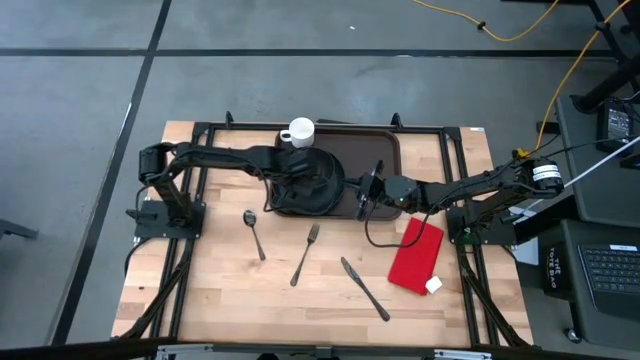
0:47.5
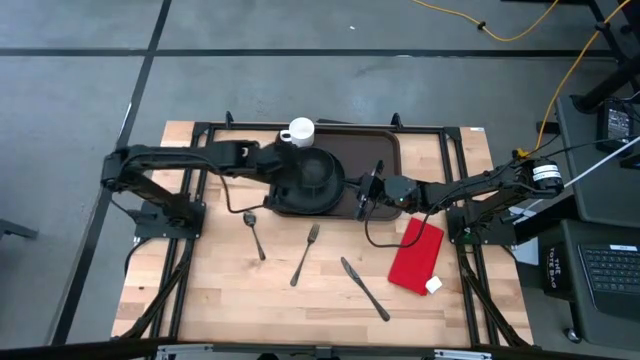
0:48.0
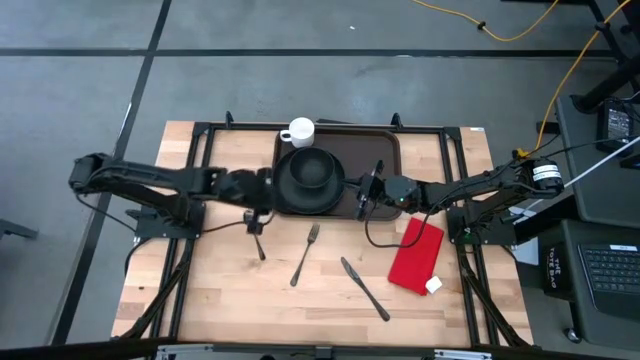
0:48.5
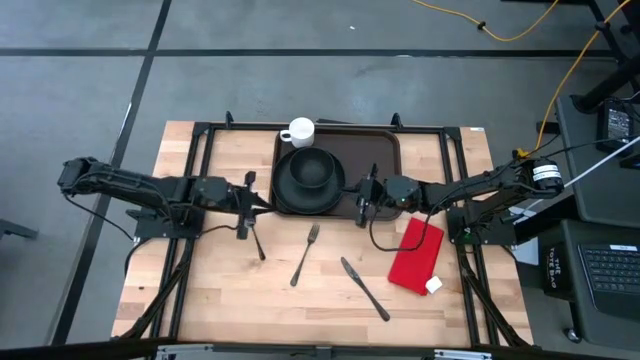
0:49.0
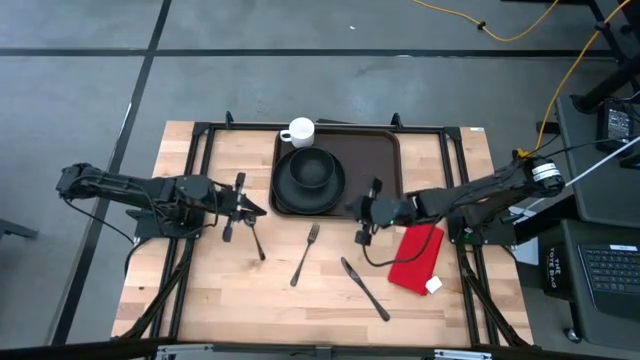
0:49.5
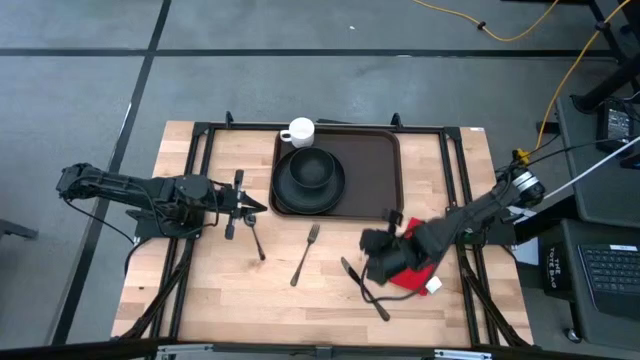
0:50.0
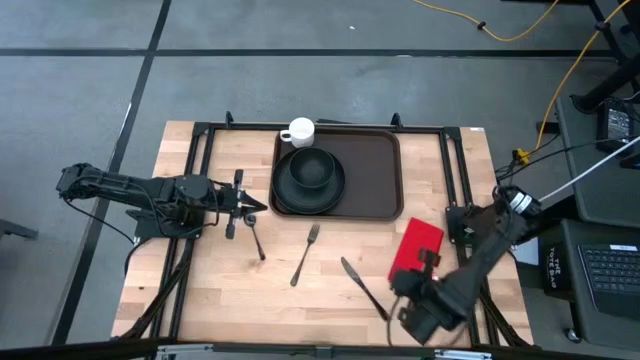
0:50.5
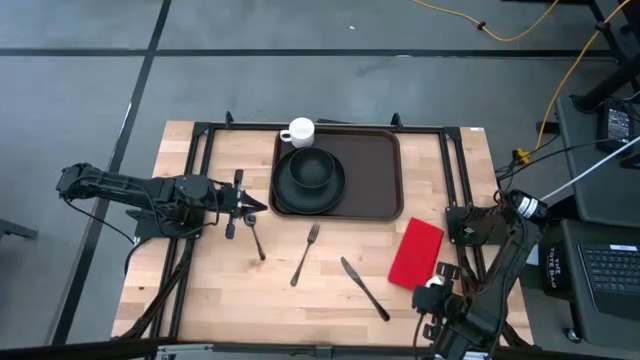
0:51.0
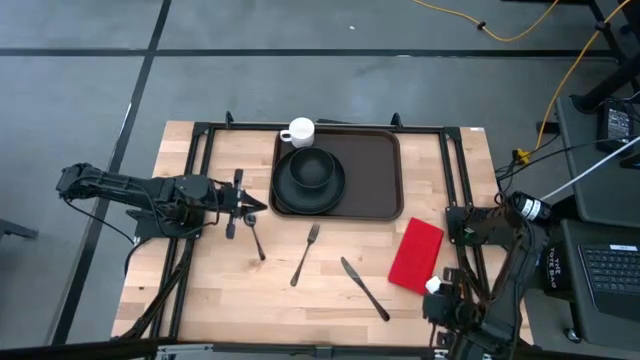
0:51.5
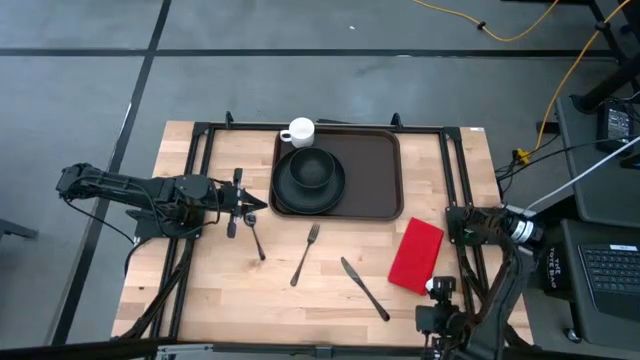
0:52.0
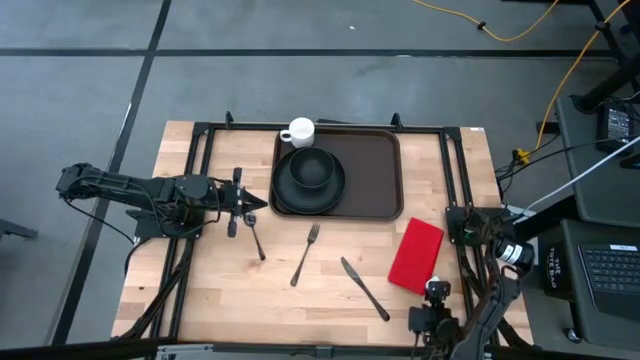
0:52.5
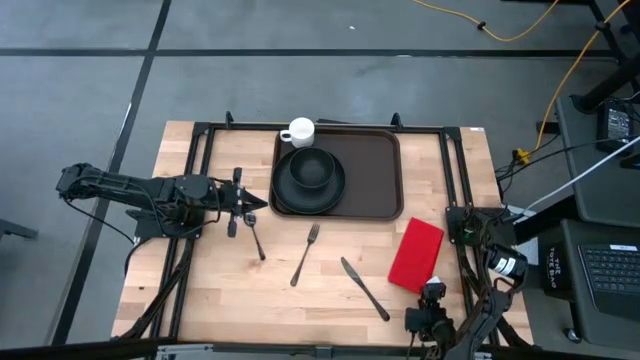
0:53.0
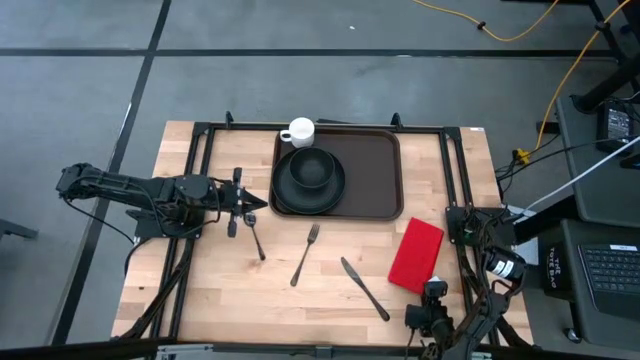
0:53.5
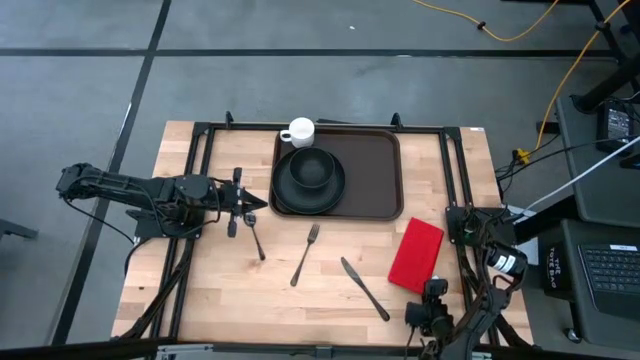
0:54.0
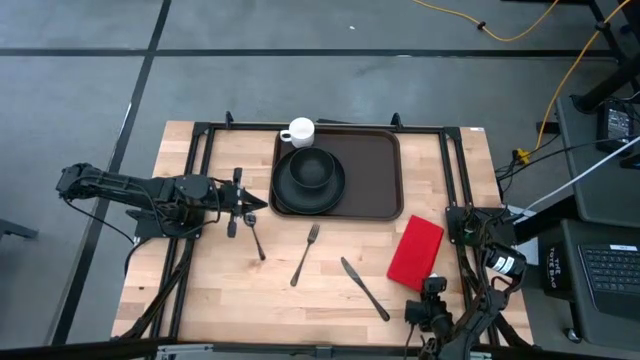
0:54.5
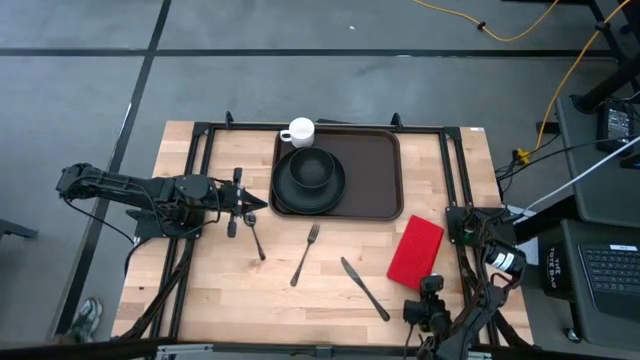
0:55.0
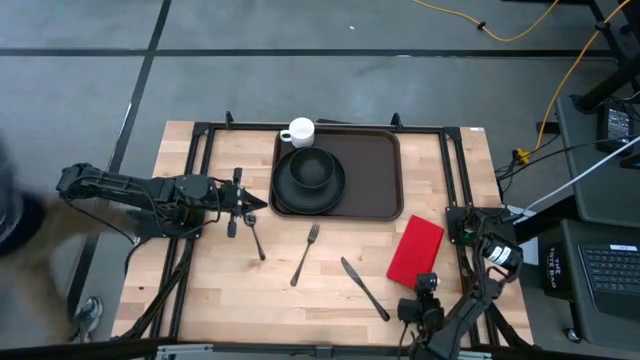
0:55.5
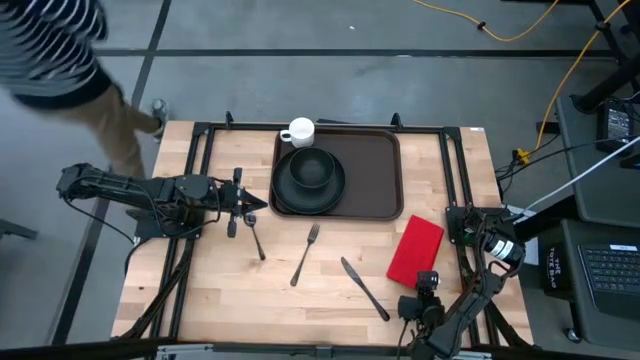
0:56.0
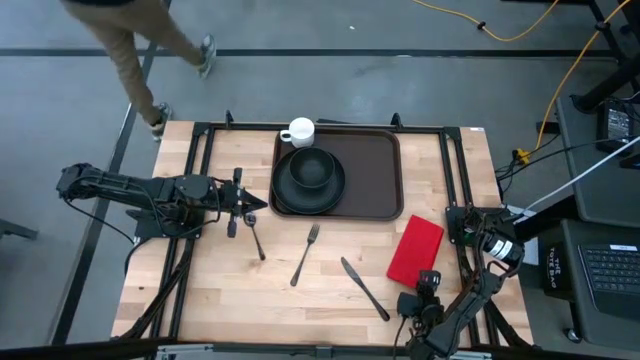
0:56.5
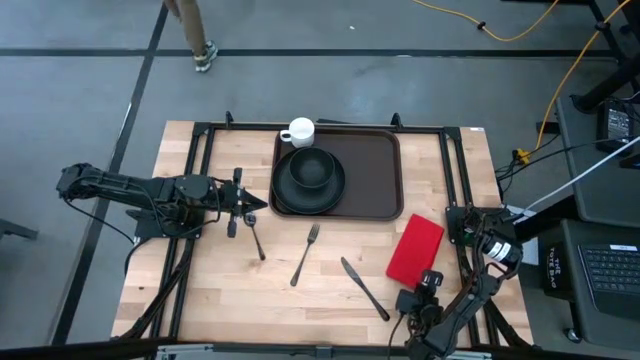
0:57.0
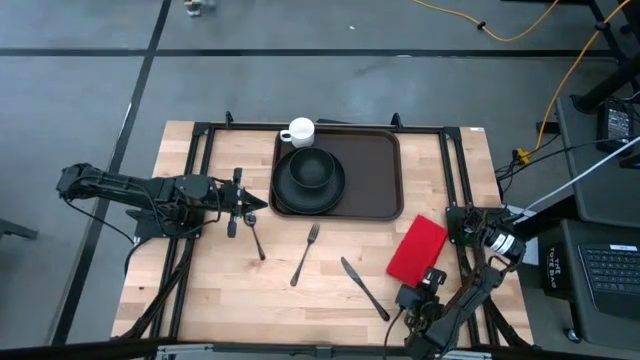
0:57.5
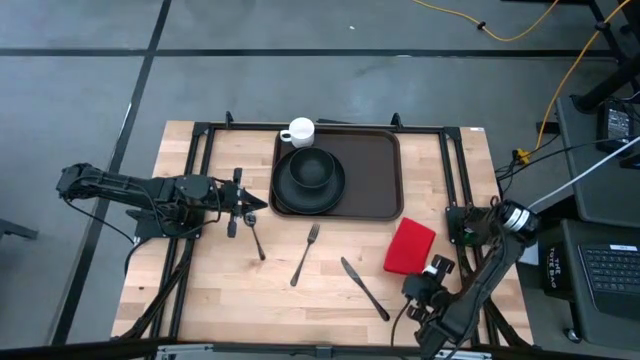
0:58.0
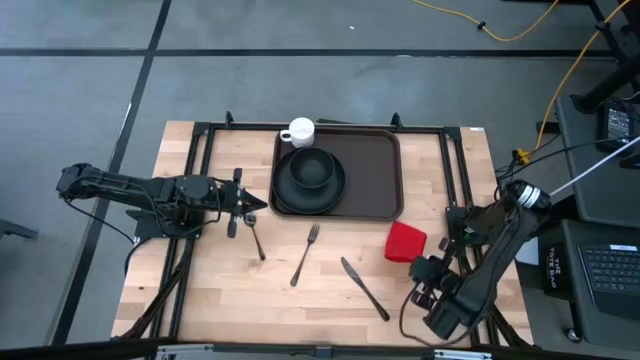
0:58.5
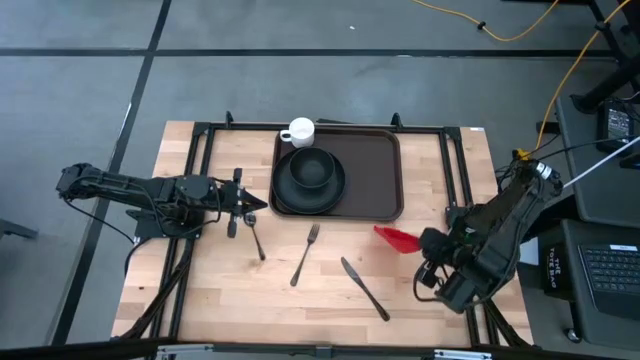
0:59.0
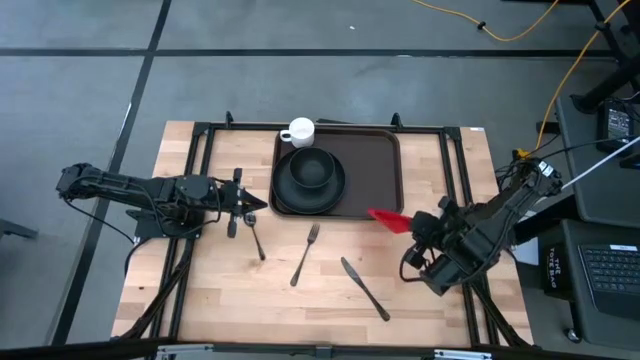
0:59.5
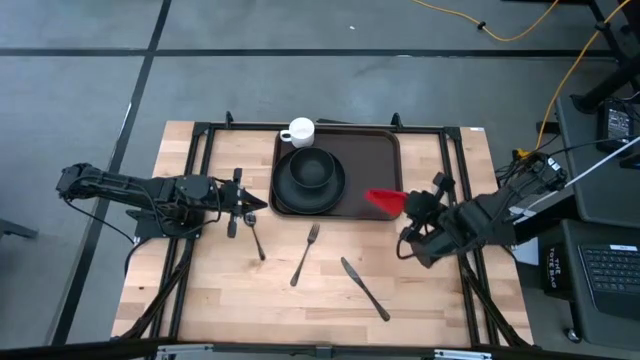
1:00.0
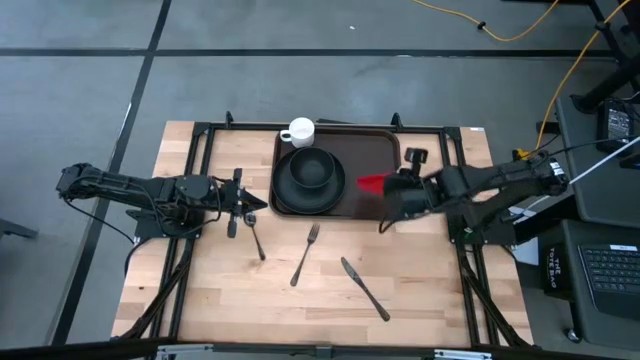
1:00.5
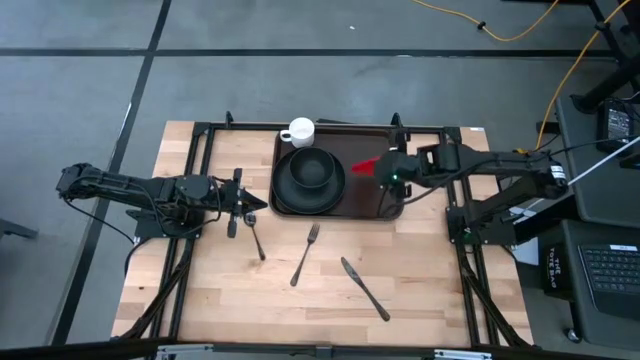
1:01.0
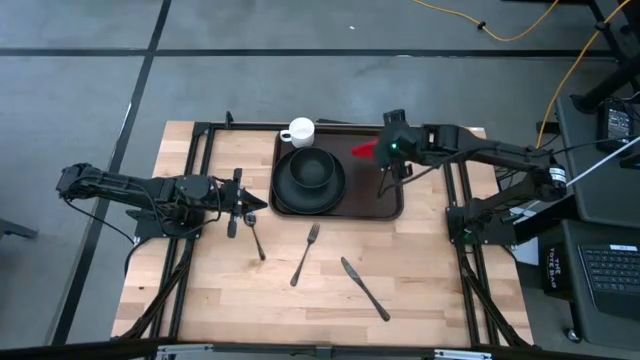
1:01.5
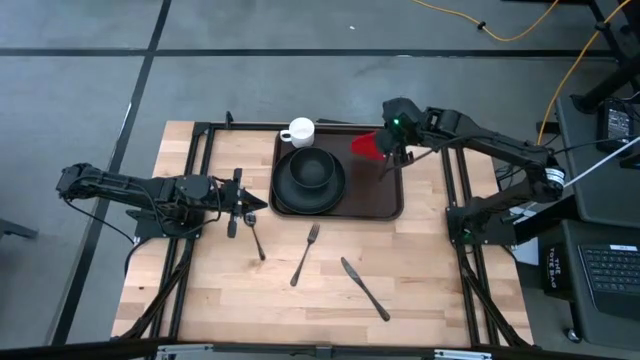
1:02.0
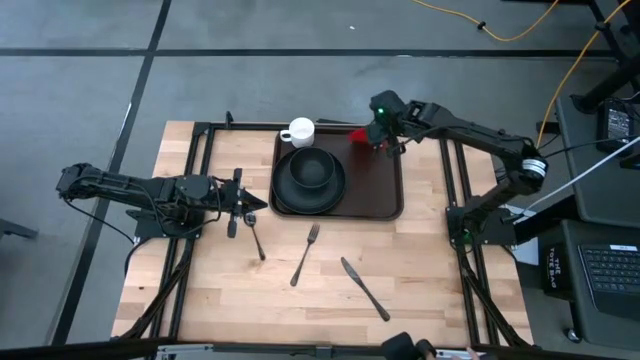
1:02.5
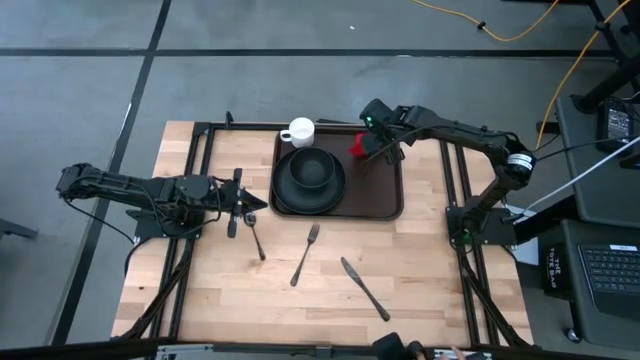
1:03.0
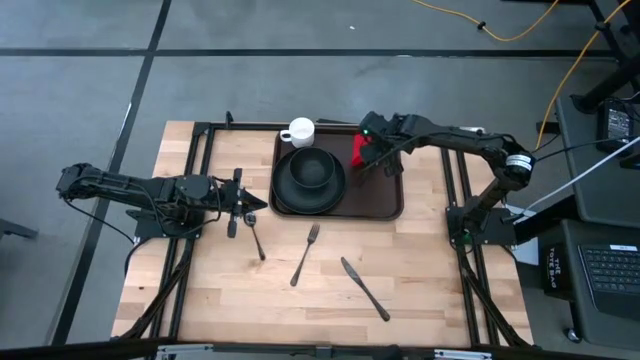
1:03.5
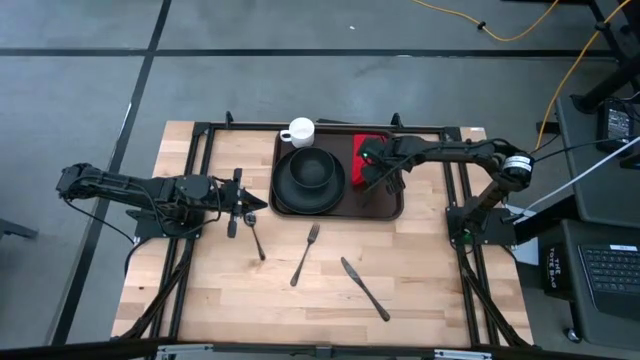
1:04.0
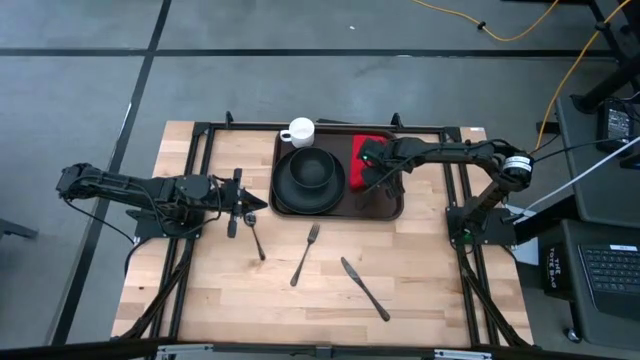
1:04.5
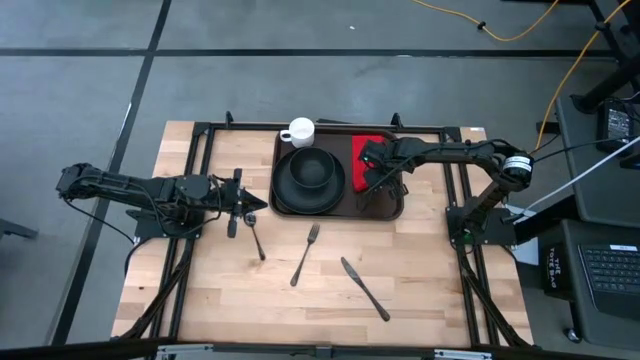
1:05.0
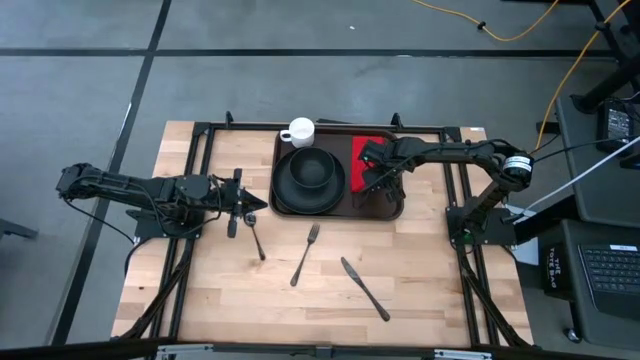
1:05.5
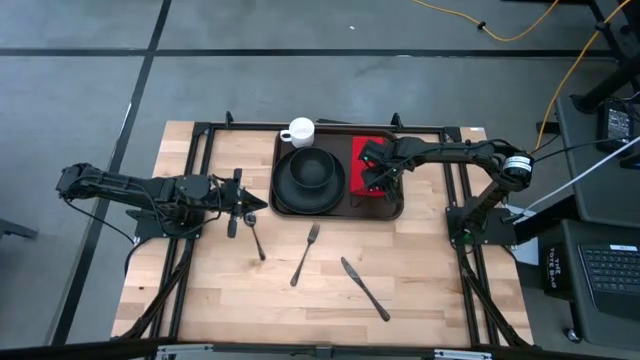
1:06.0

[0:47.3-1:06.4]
Task: Set up tray
Put the red napkin to the right of the black plate on the brown serving tray

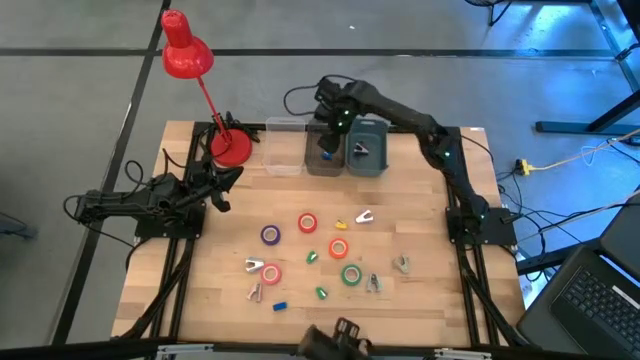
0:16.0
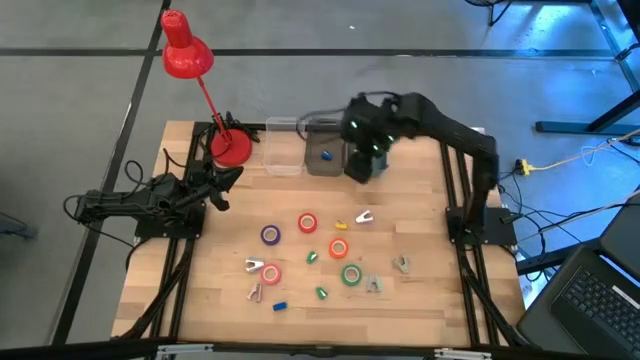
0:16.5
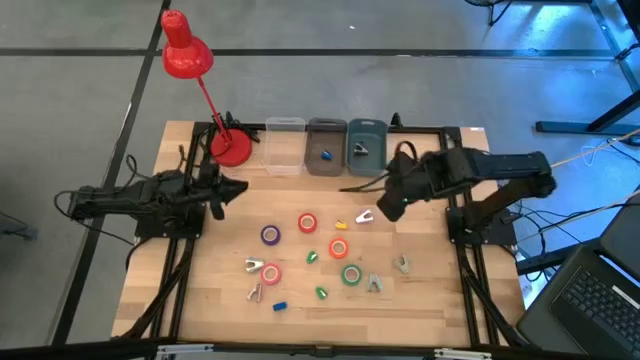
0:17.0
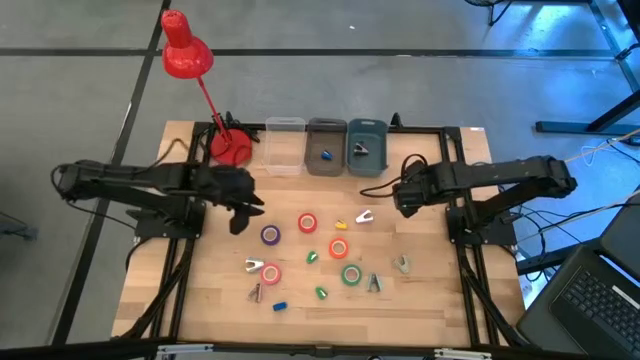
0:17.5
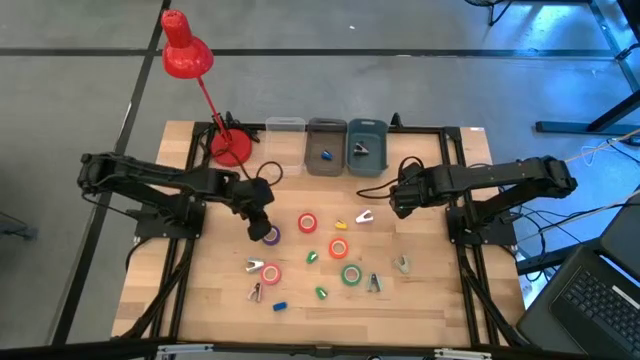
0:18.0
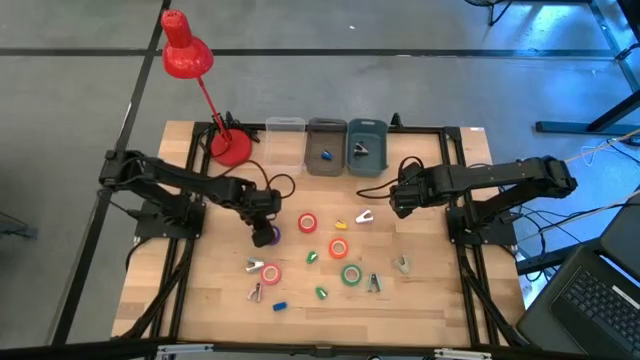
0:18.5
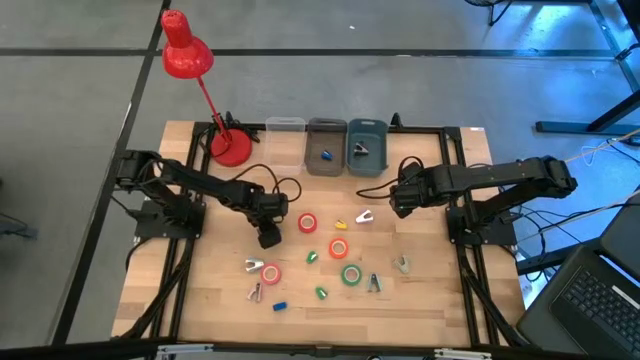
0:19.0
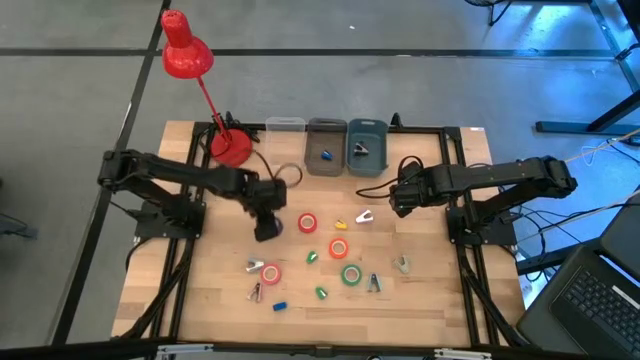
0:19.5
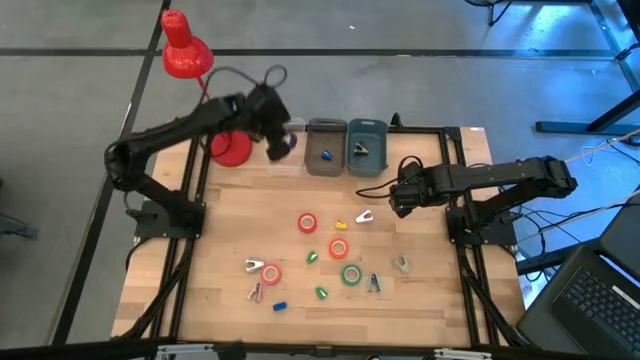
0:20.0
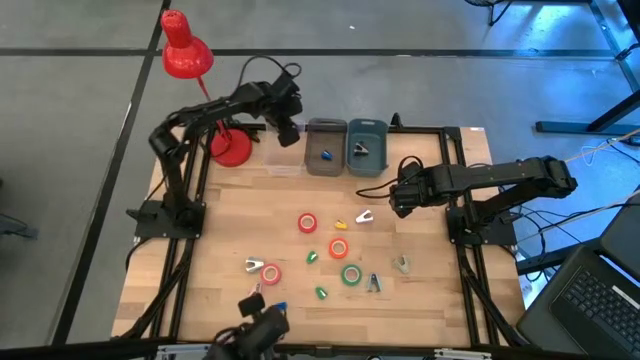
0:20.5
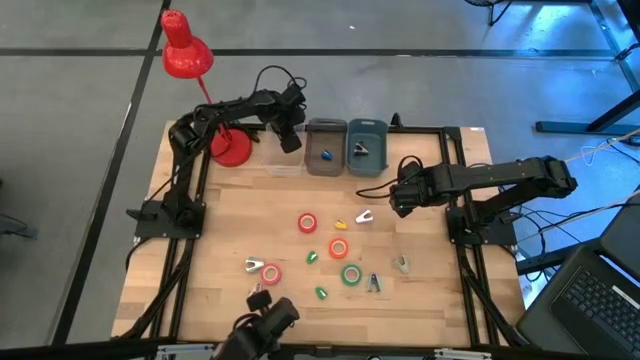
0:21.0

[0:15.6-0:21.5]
Task: Pick and place Stapler, Stapler remover, tape
Put the purple tape into the transparent bin
